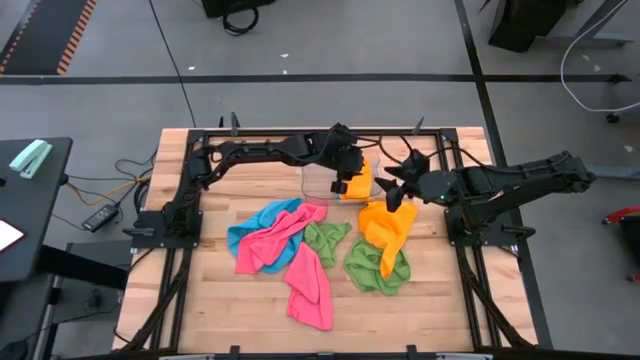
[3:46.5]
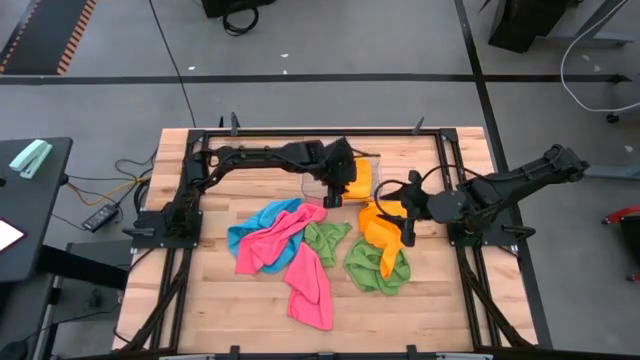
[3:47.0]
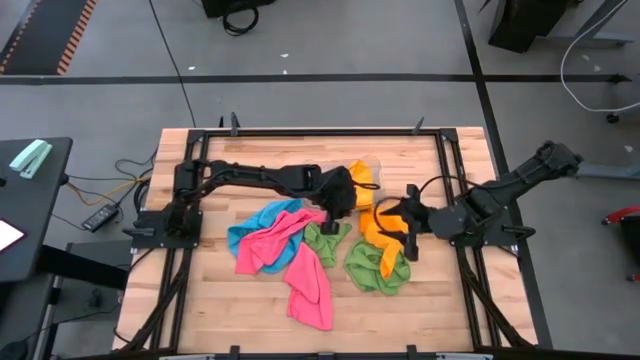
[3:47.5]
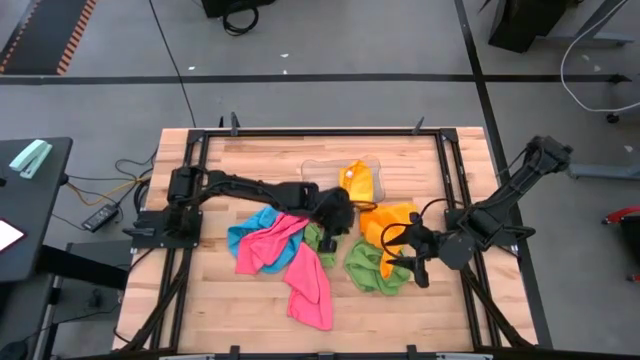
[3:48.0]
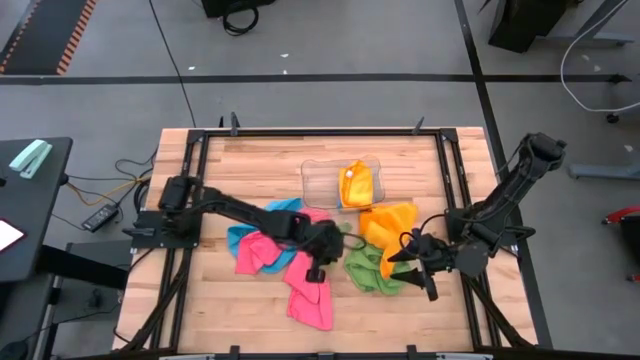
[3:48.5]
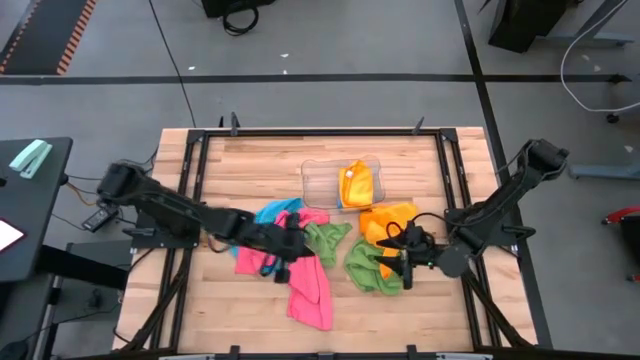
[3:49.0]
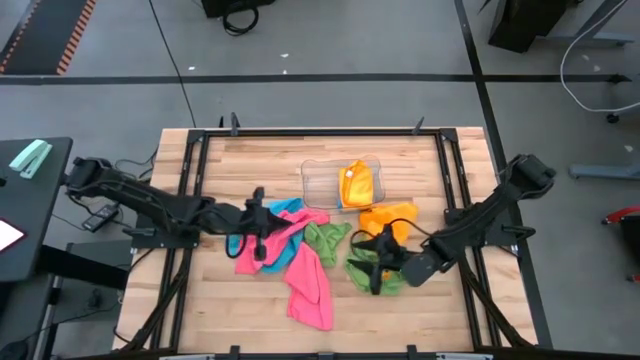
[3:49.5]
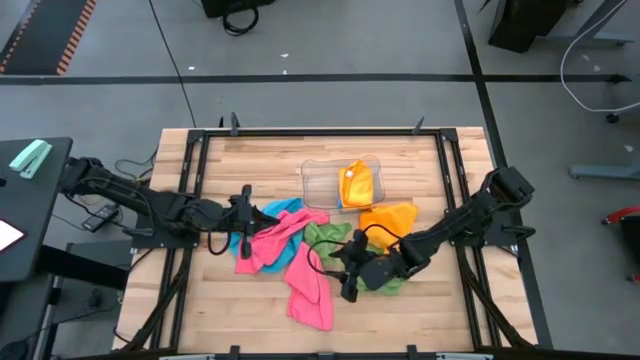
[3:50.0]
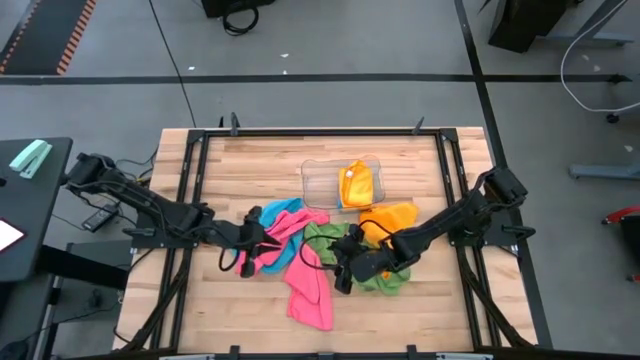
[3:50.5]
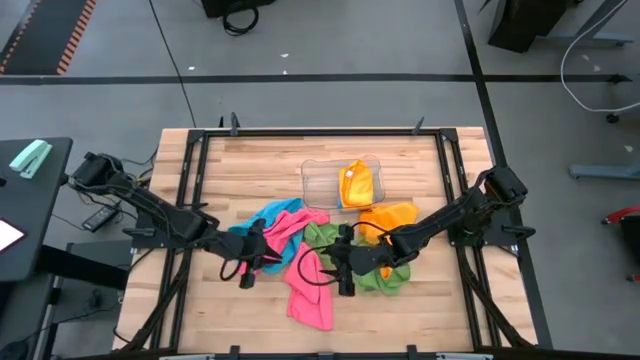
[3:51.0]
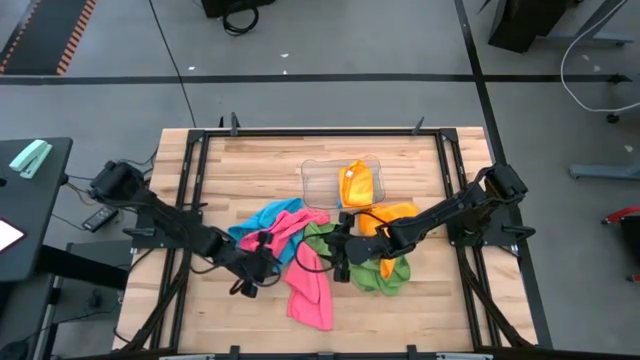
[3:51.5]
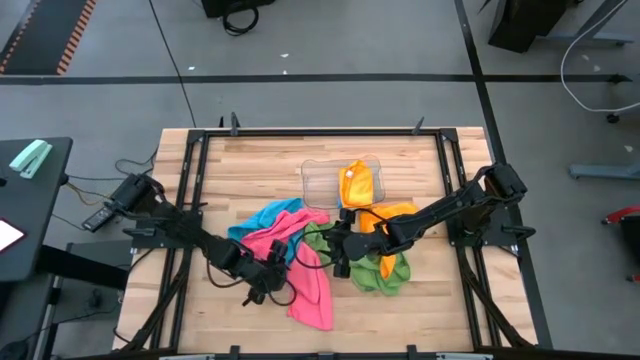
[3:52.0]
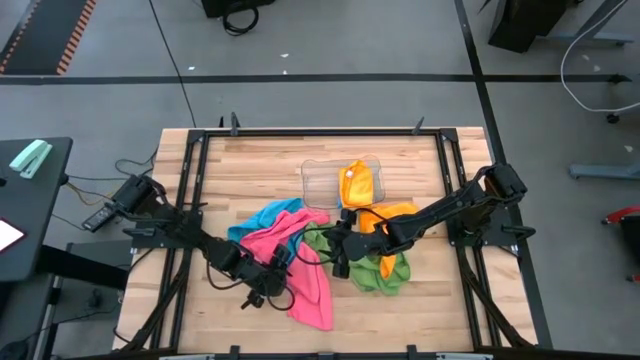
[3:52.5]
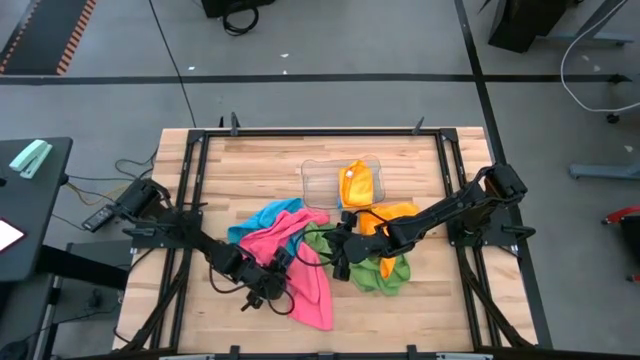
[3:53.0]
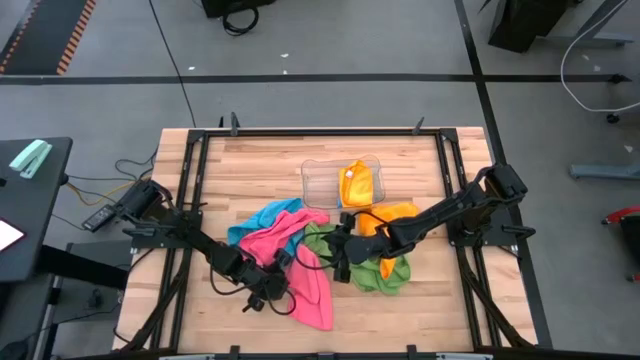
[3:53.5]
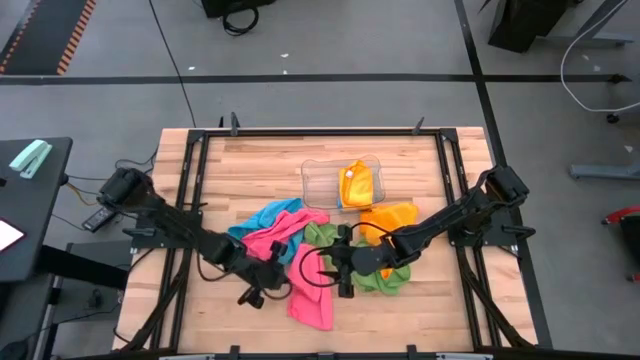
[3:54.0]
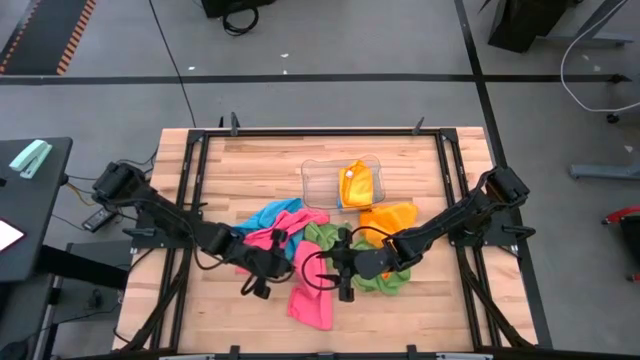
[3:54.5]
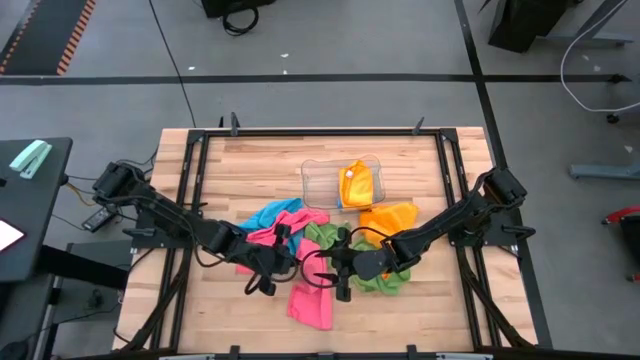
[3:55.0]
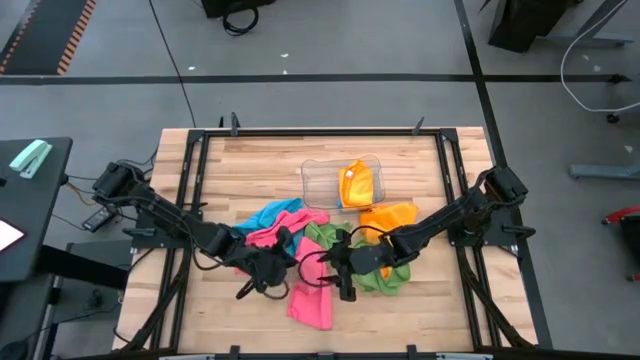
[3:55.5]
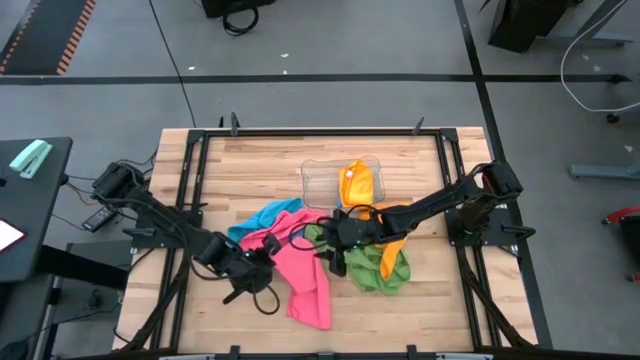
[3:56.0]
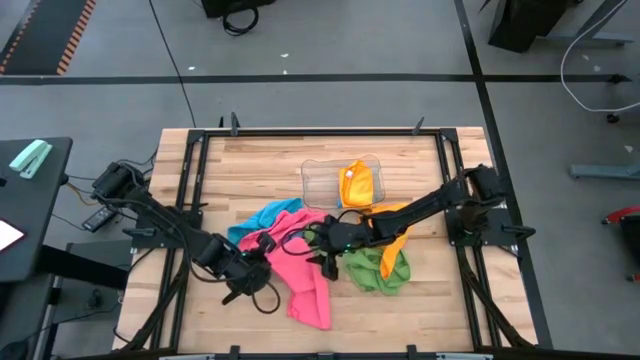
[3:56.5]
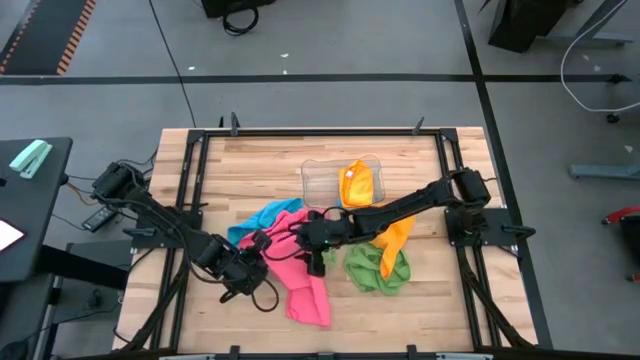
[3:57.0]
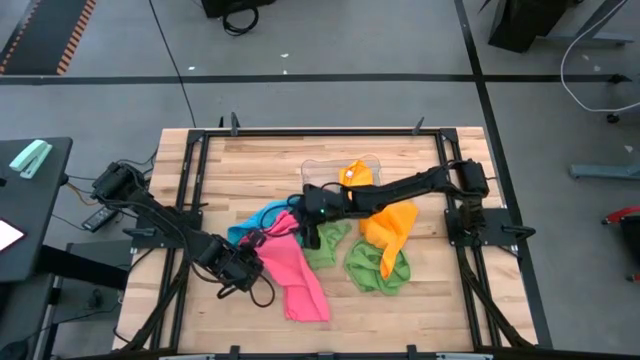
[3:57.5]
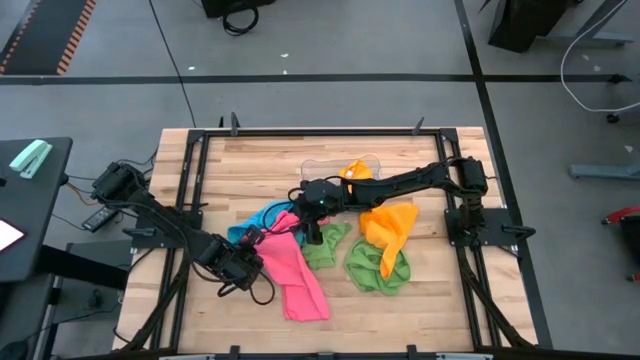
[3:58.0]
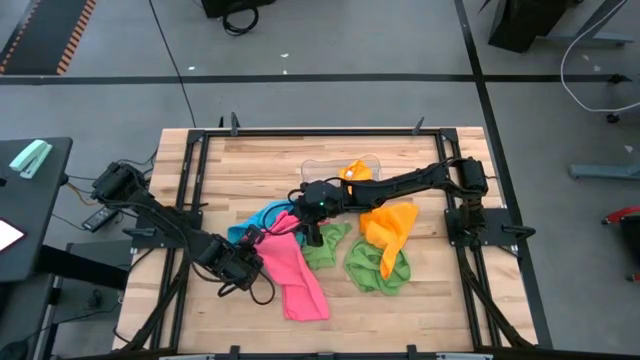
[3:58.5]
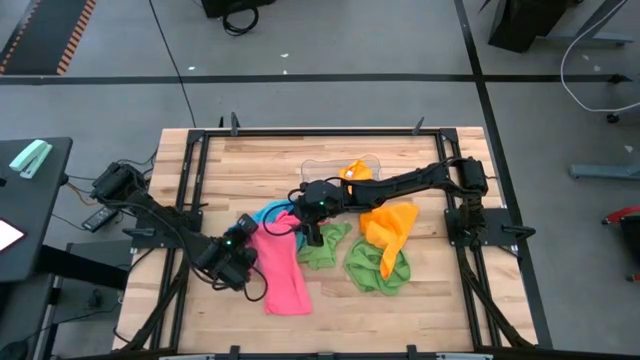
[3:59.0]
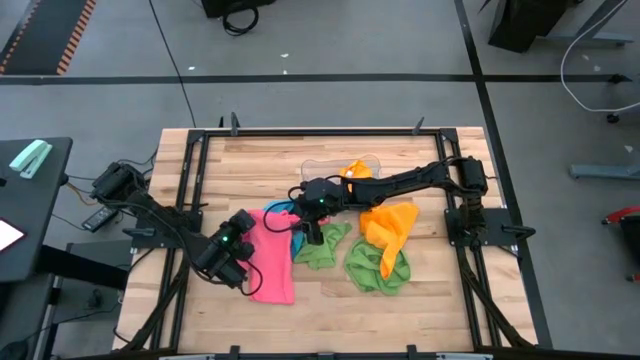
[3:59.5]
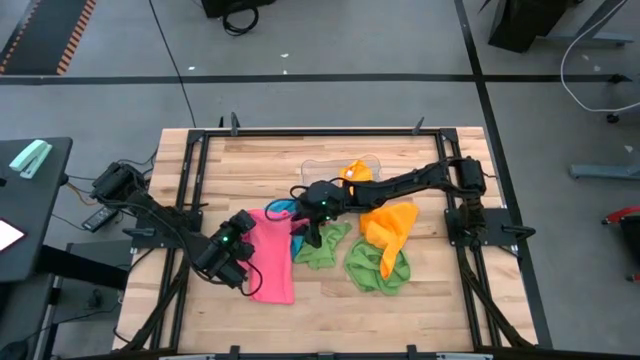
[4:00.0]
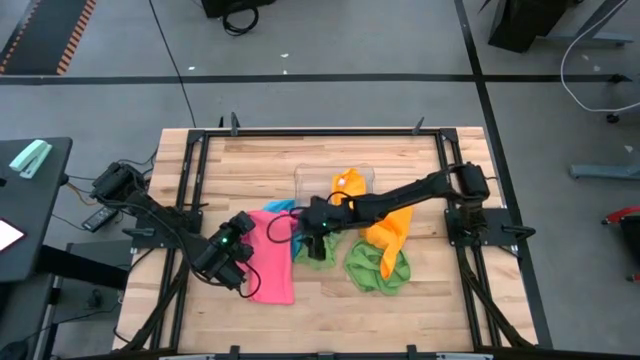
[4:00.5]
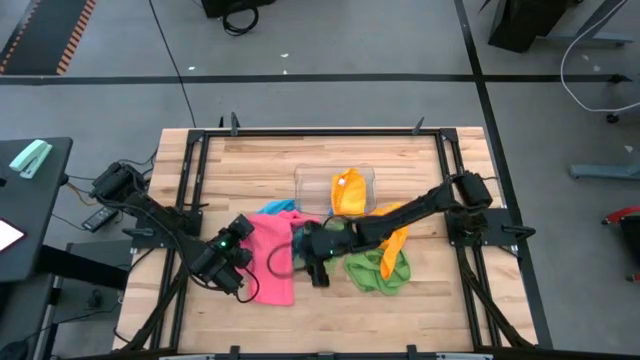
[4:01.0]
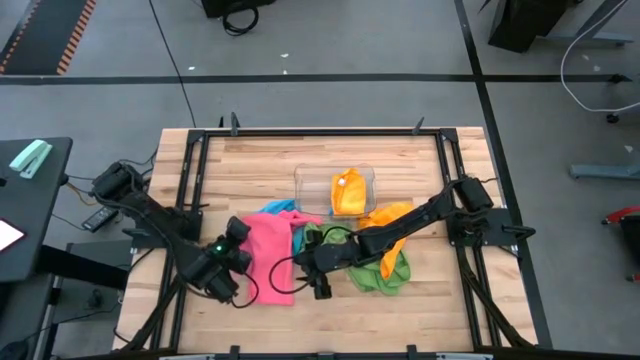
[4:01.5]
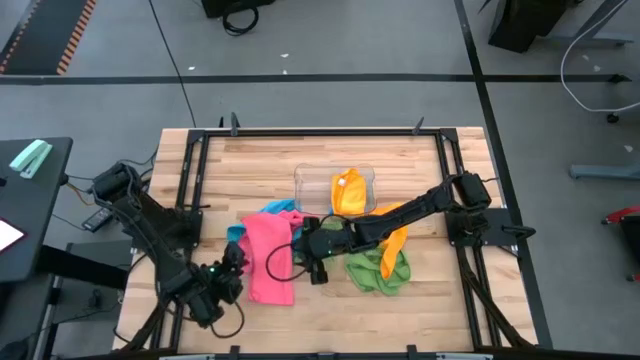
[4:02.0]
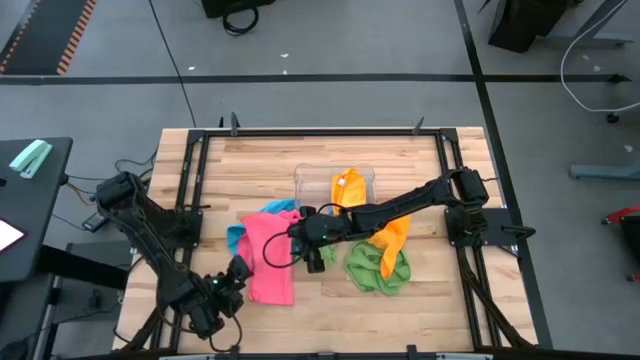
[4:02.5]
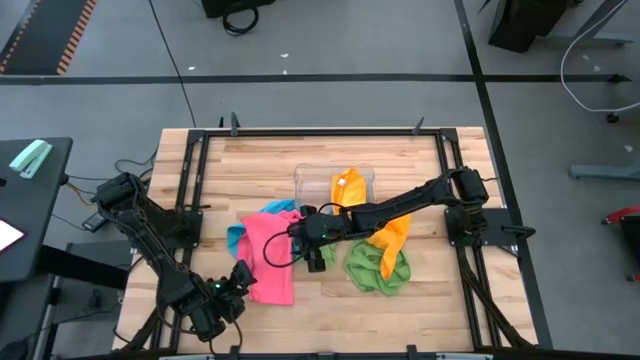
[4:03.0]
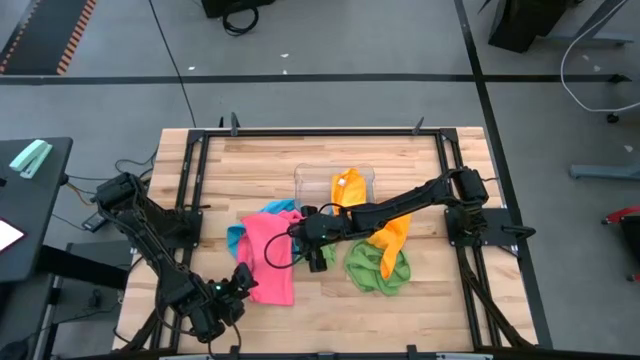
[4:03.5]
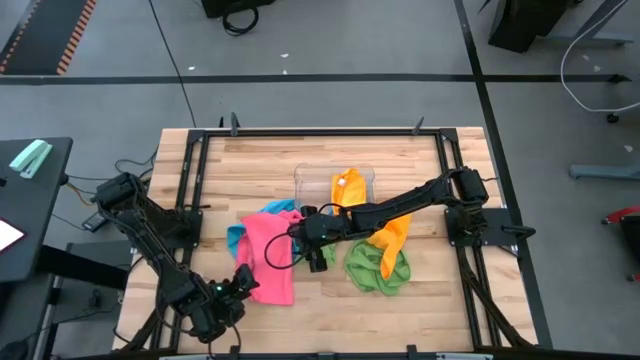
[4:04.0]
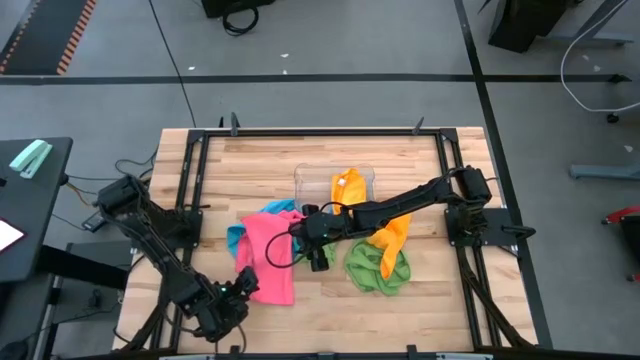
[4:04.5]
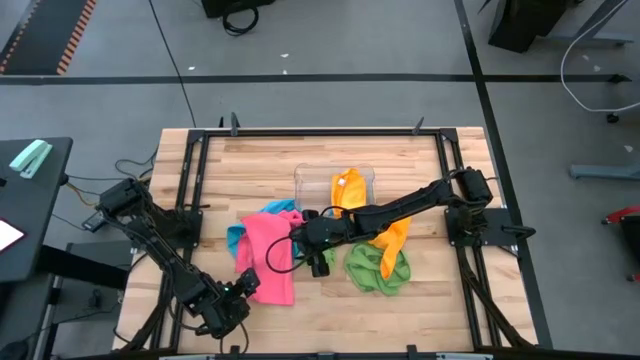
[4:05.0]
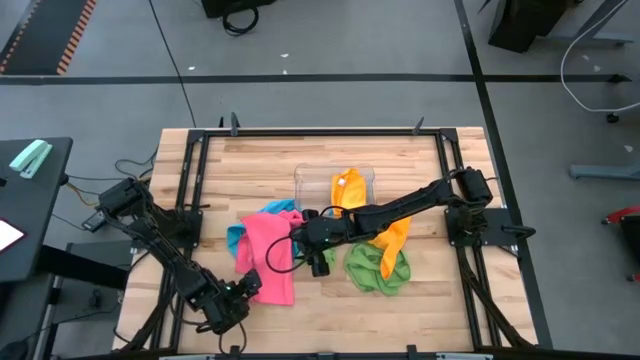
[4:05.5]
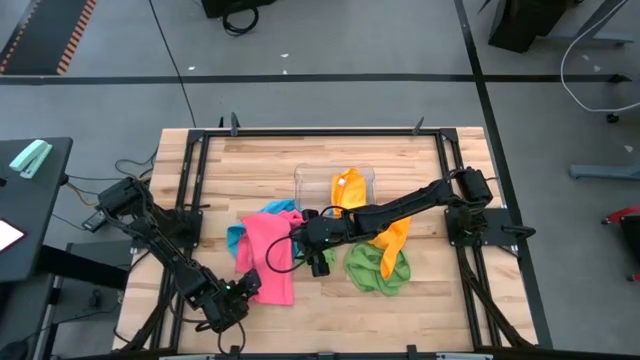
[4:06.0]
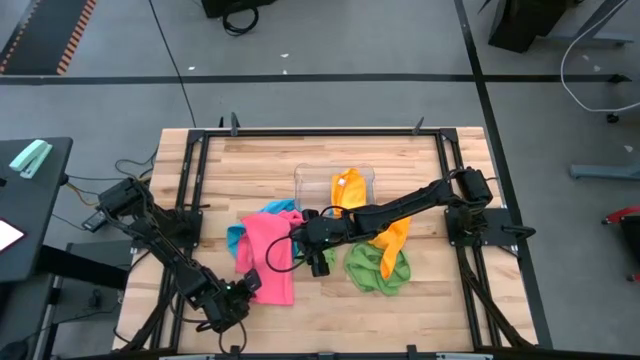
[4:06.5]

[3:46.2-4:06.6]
Task: Fold microfiber towels
Fold the bottom pink microfiber cloth
